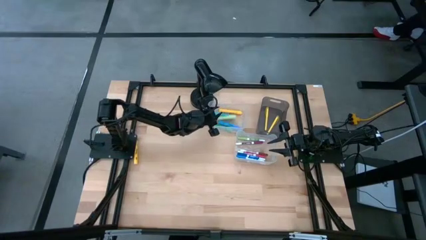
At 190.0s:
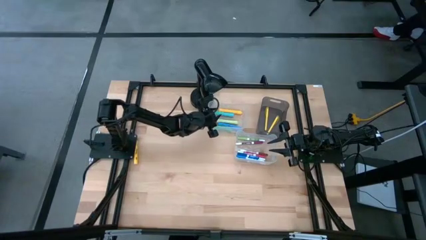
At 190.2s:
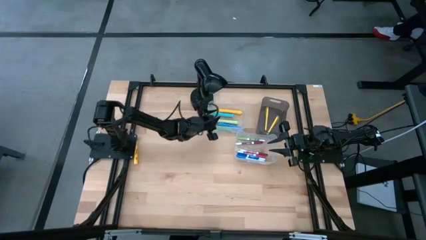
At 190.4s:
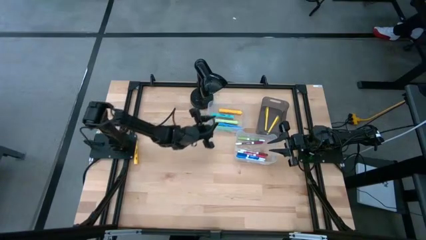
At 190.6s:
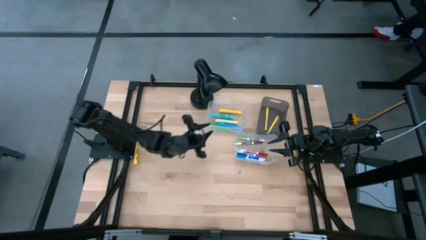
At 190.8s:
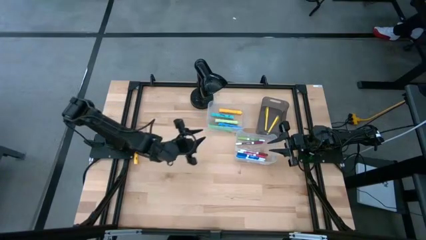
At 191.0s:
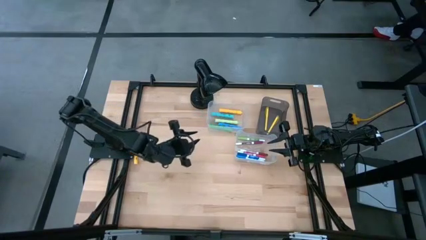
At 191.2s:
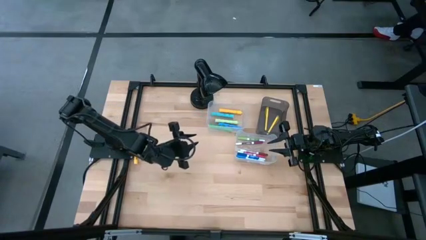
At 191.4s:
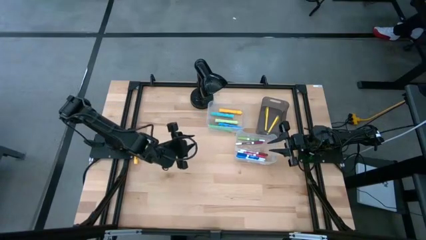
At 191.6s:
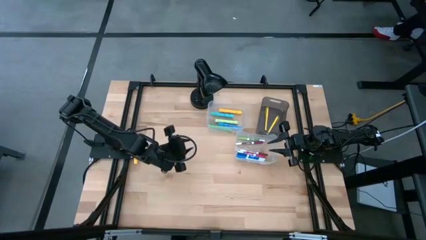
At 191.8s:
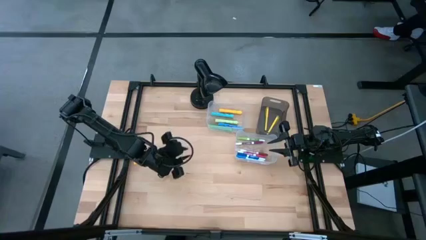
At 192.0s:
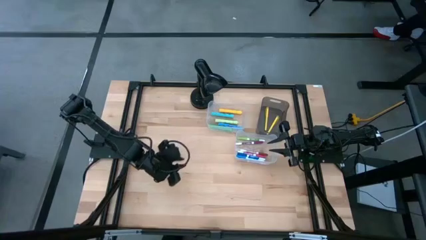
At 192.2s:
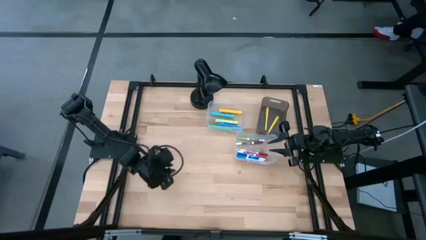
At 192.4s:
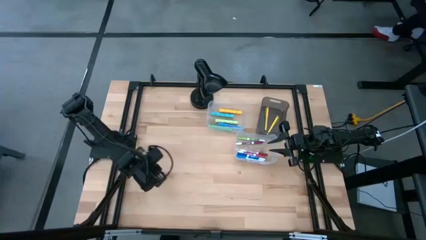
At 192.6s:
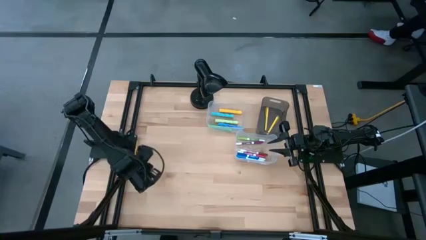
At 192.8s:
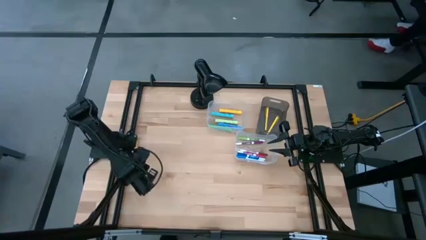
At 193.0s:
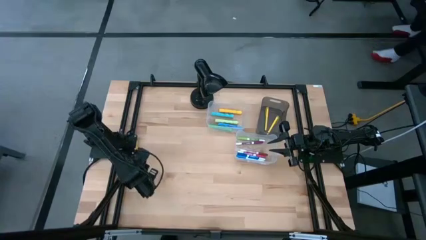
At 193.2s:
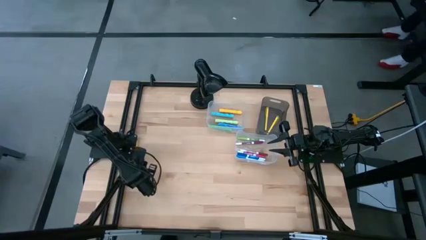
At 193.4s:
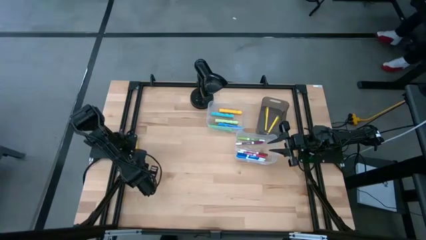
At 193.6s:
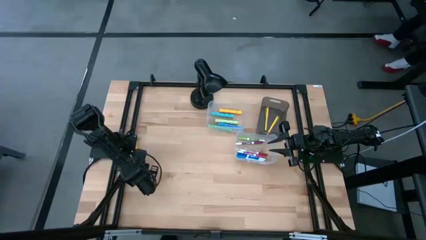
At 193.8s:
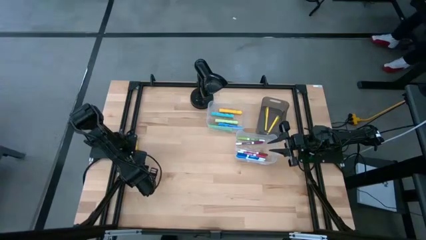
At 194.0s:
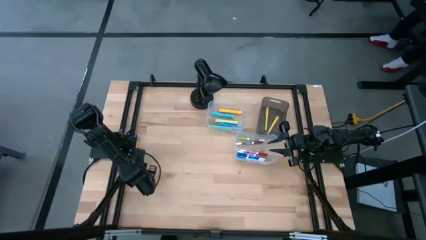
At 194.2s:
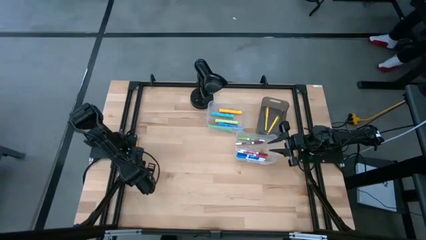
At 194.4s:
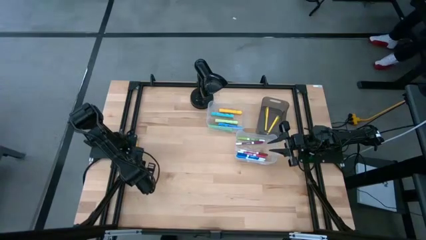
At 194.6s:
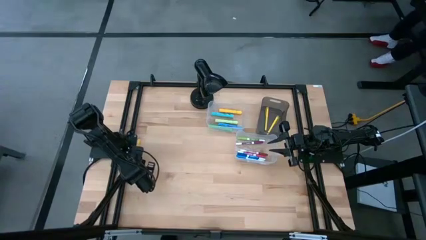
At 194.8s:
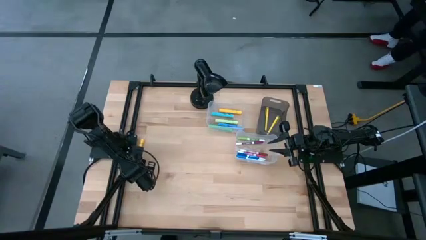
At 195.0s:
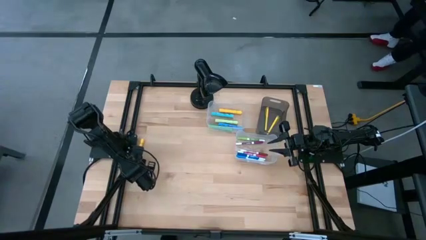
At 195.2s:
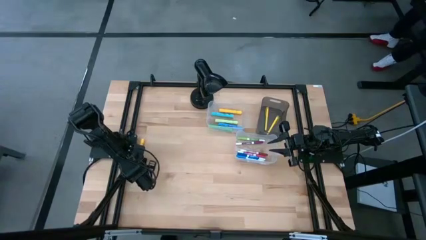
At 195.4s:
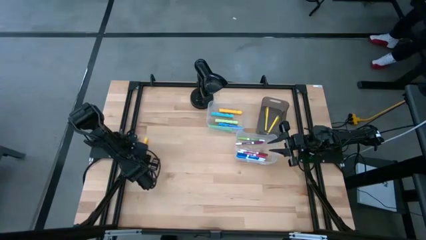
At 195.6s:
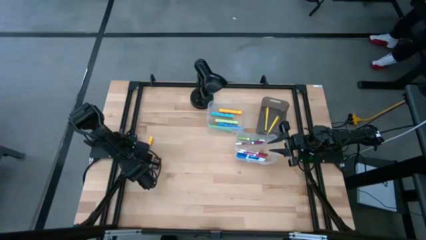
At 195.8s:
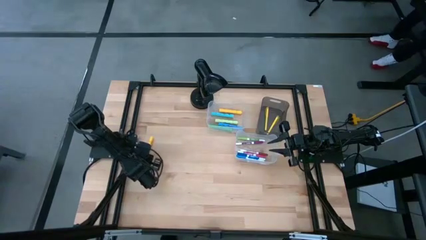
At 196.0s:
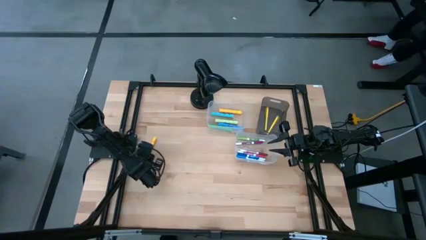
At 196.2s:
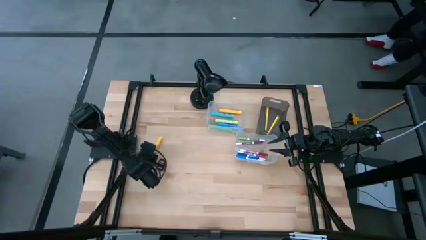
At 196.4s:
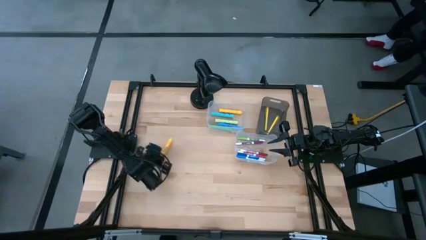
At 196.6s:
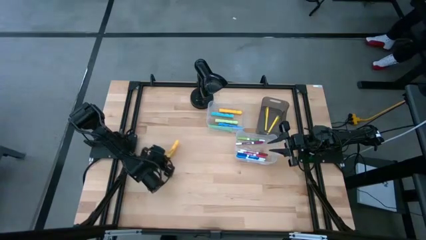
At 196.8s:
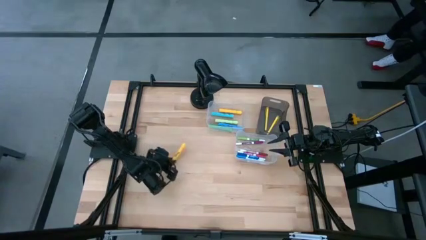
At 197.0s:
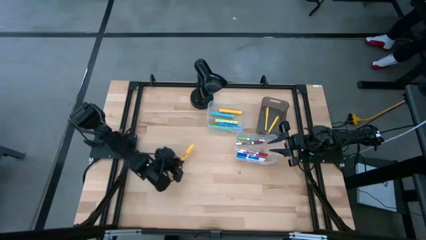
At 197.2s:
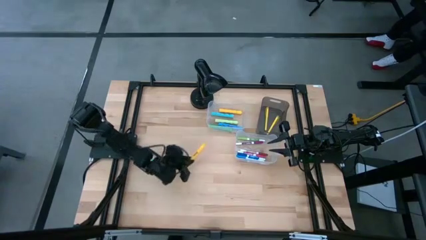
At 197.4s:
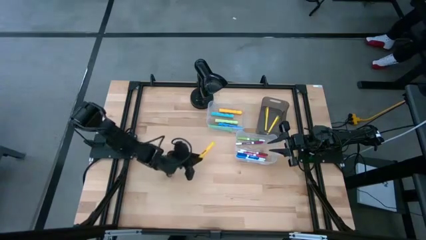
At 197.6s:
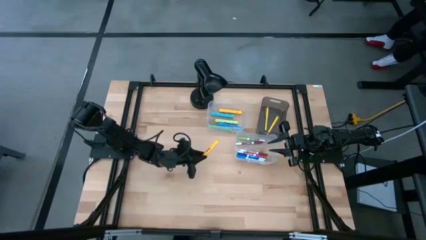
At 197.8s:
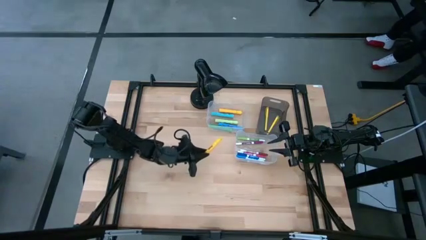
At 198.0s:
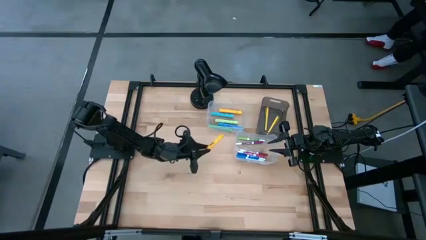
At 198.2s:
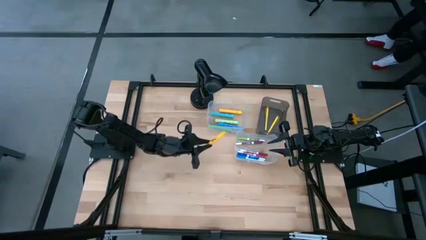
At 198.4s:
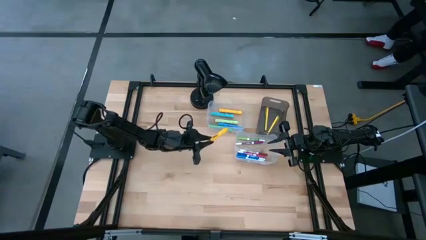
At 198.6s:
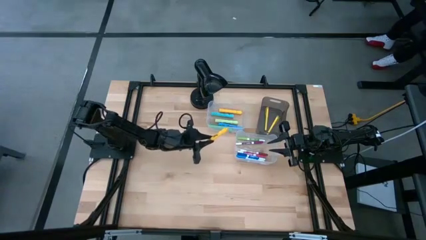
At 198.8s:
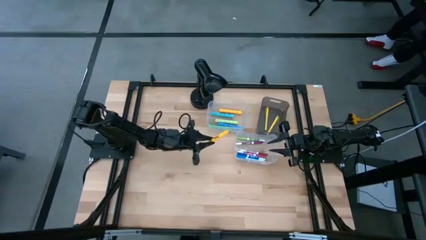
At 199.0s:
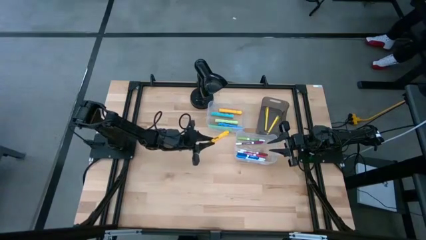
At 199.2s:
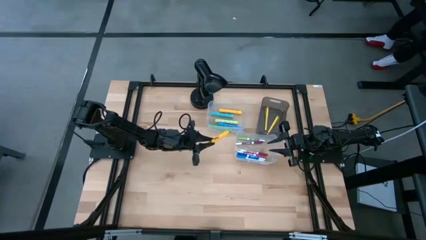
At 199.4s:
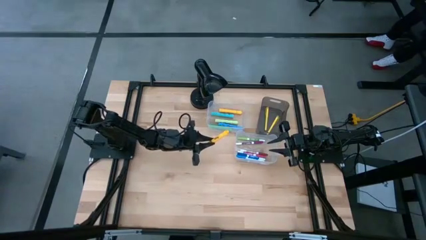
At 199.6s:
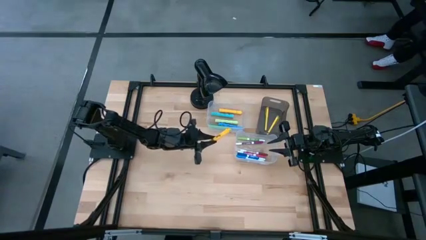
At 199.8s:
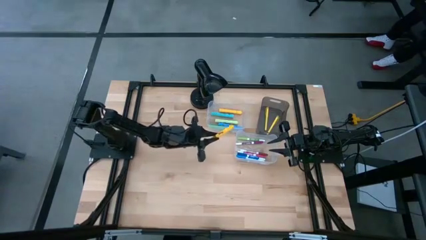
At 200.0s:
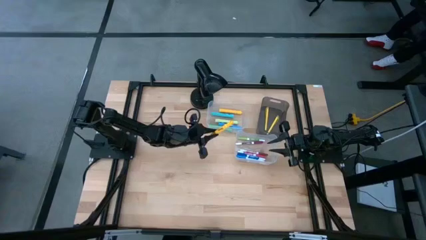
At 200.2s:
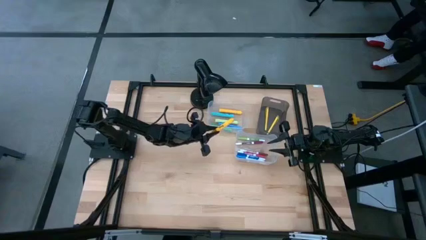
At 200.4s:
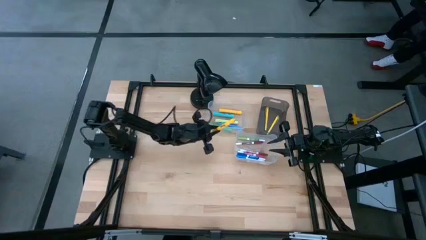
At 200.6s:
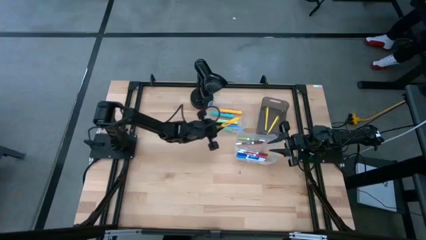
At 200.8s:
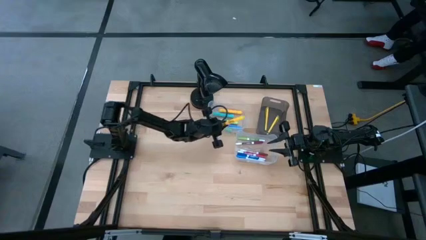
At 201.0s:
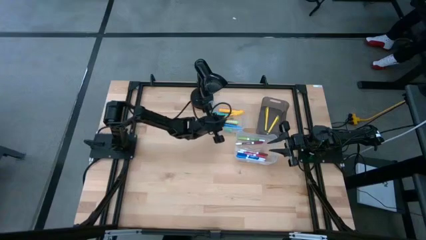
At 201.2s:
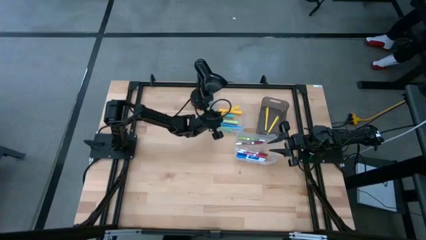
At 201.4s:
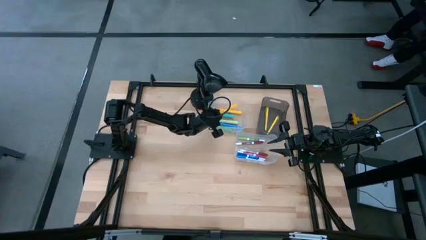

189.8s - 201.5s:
Task: Pick & Place Markers
Put the yellow highlighter pen into the top transparent bin

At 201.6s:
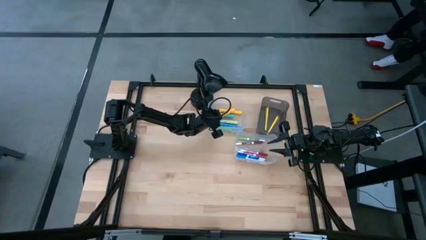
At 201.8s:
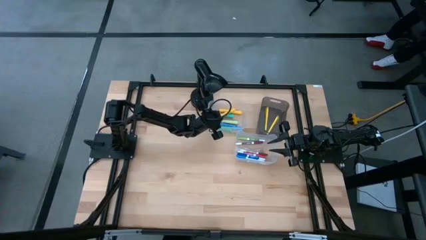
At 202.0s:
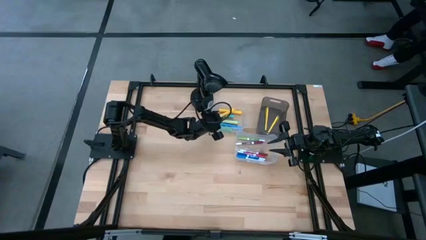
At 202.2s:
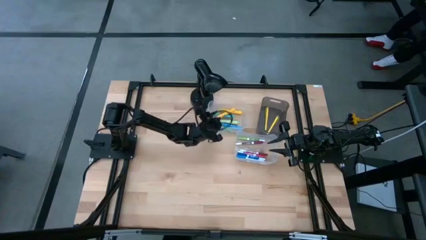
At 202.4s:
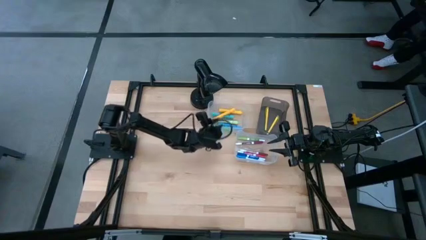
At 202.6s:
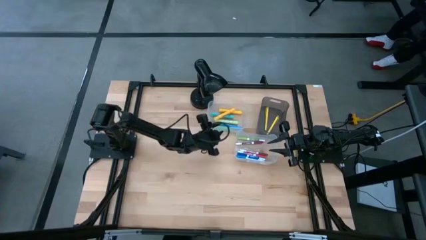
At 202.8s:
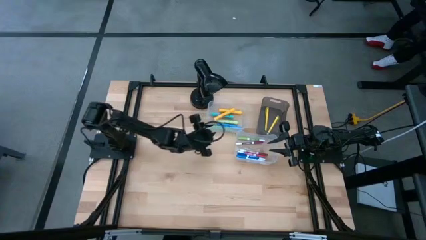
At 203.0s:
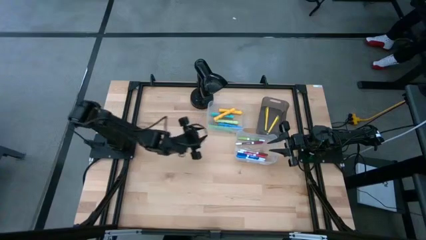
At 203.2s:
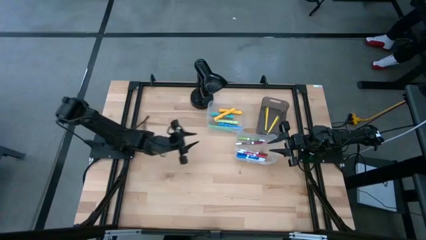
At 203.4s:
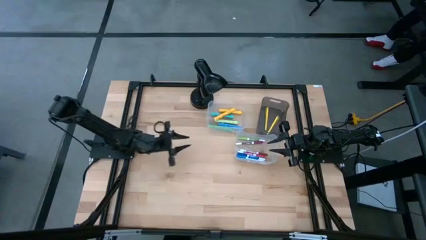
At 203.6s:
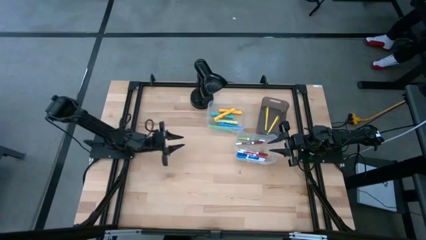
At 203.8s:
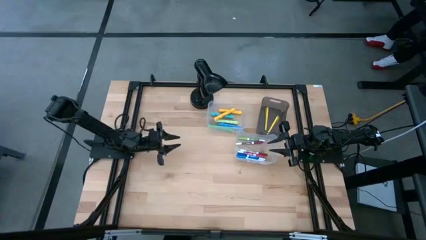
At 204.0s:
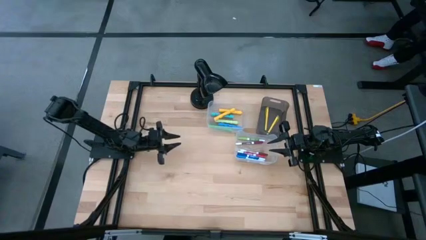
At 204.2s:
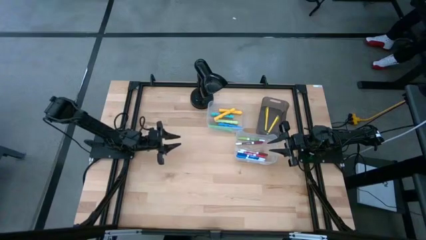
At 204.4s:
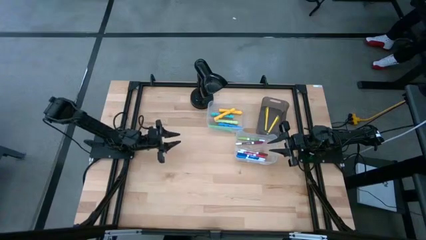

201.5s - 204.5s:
Return to Home Position
